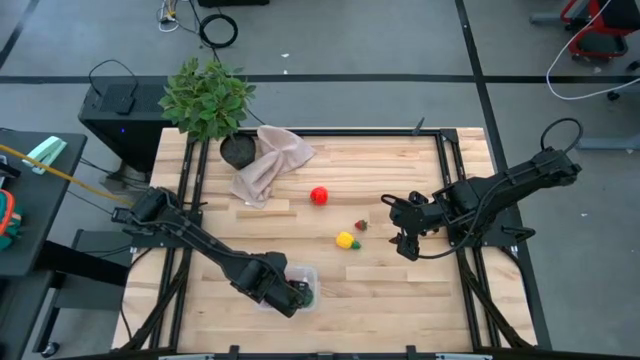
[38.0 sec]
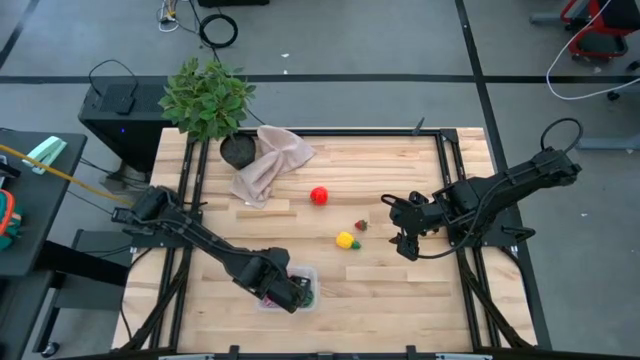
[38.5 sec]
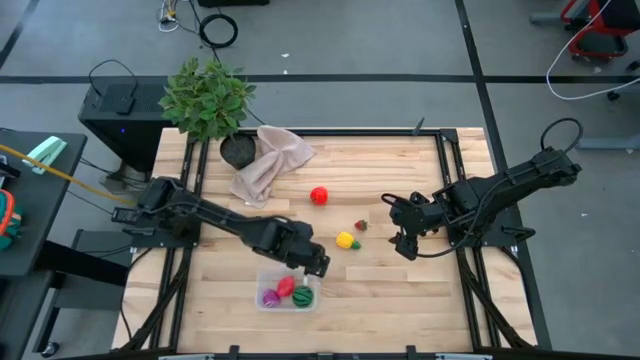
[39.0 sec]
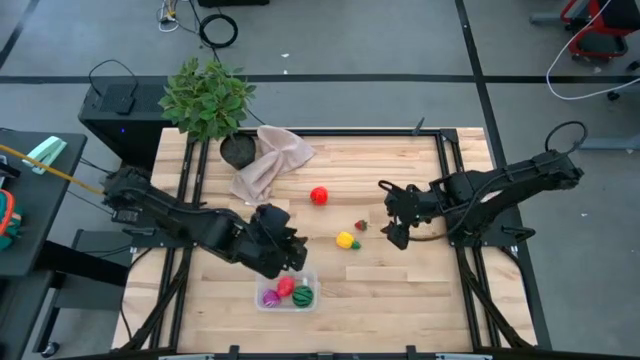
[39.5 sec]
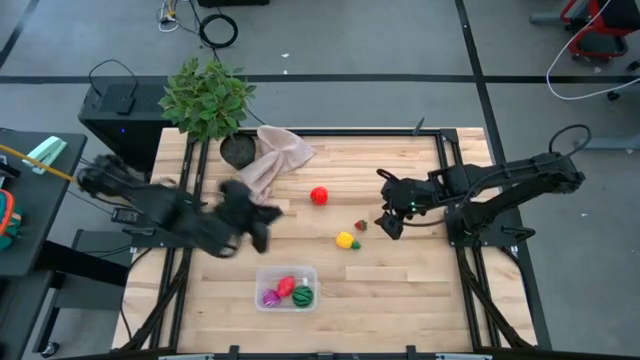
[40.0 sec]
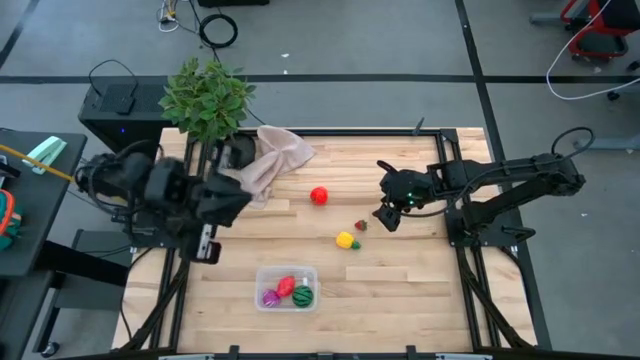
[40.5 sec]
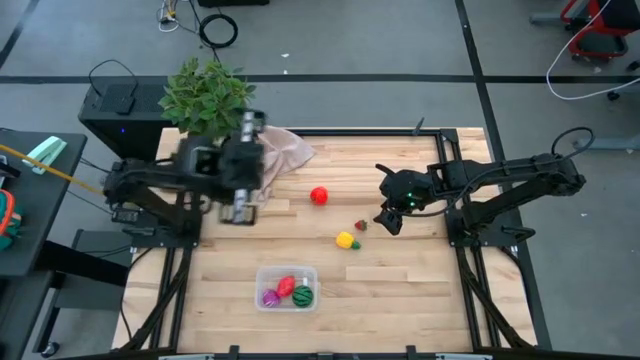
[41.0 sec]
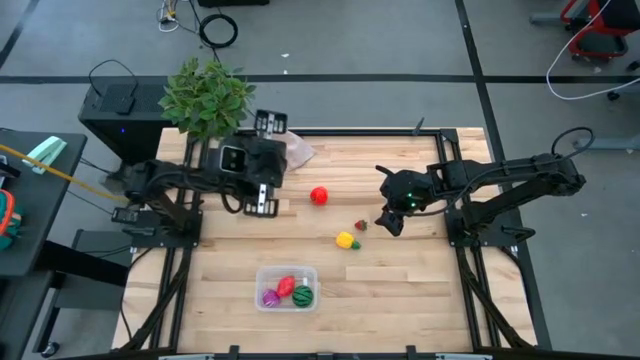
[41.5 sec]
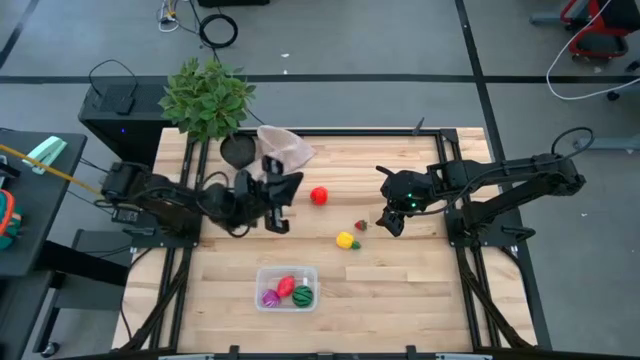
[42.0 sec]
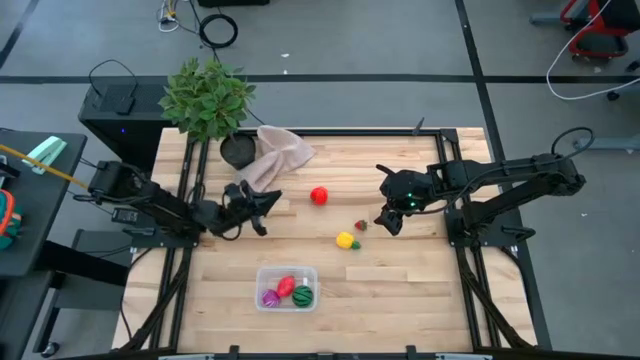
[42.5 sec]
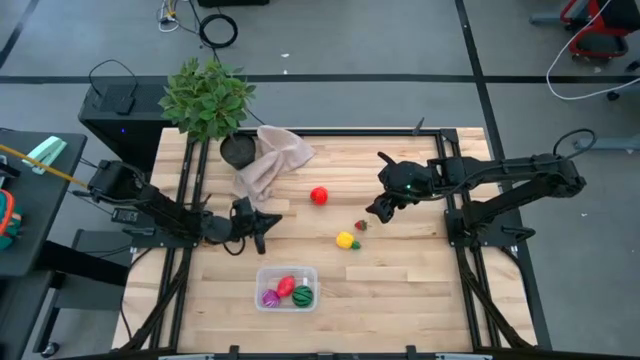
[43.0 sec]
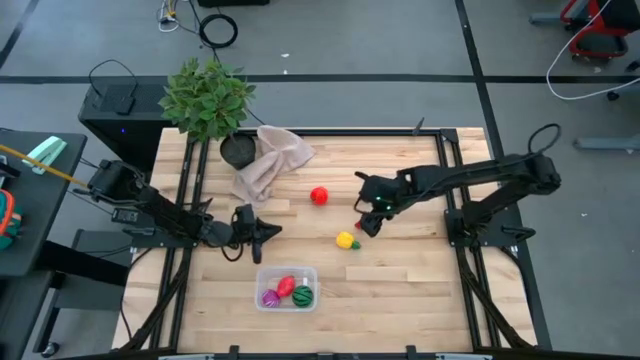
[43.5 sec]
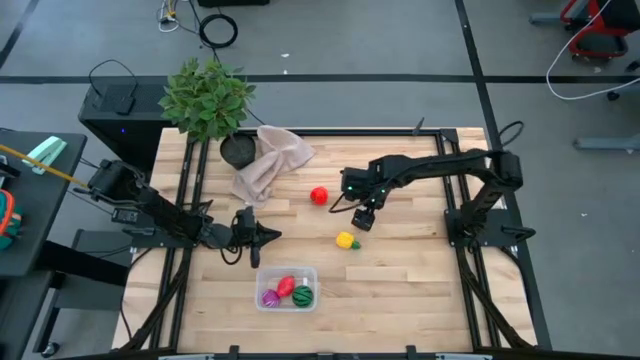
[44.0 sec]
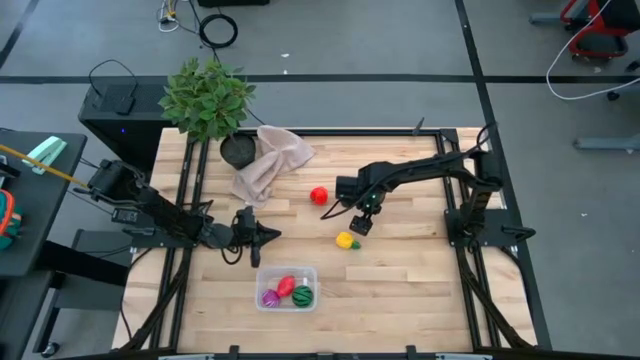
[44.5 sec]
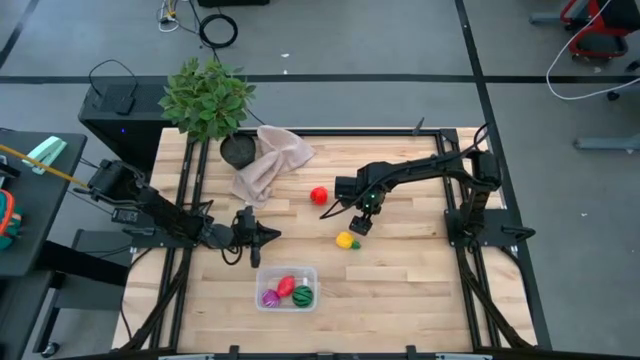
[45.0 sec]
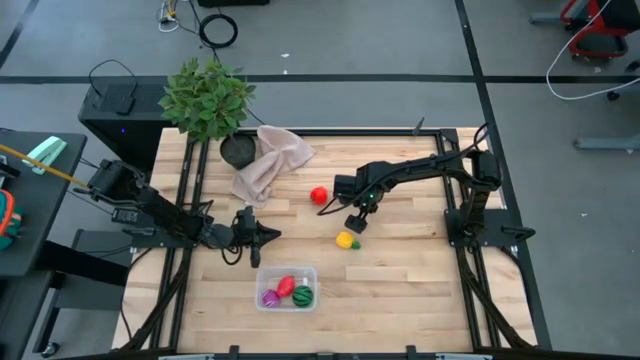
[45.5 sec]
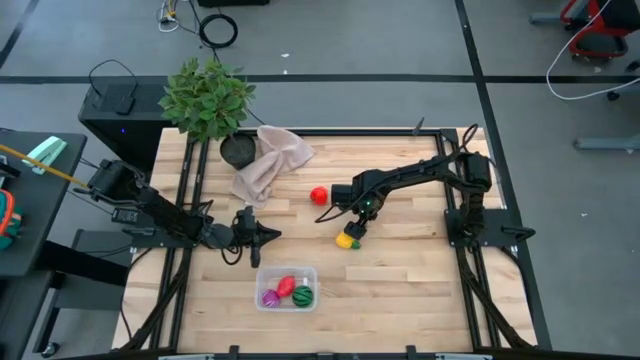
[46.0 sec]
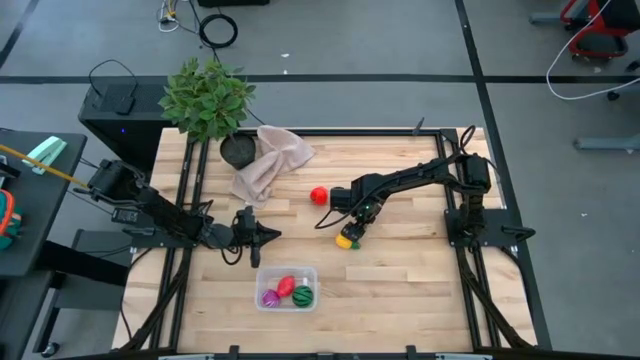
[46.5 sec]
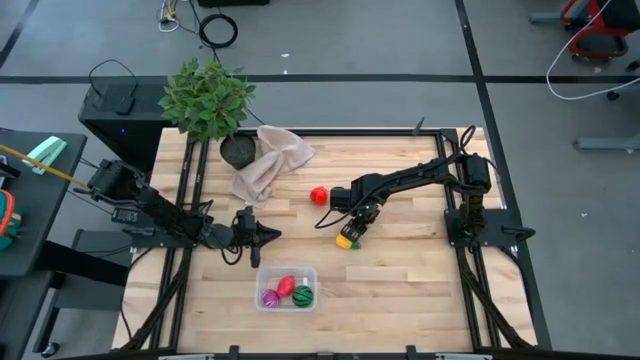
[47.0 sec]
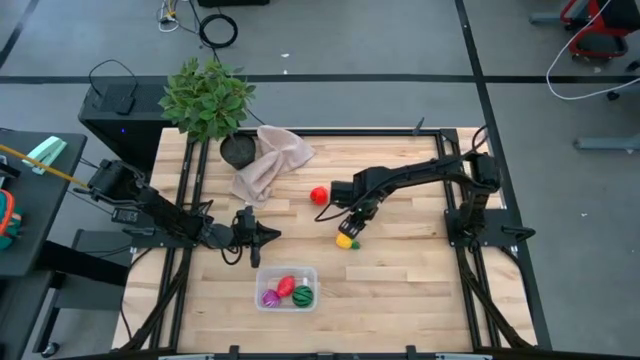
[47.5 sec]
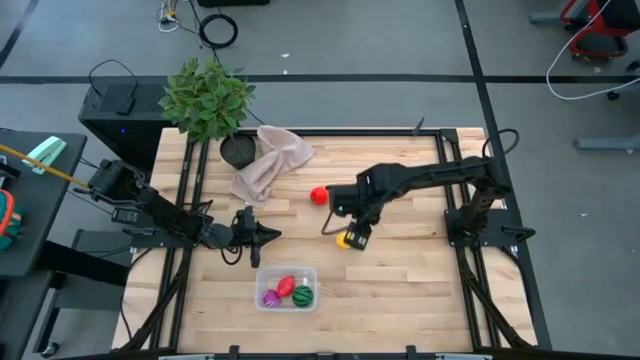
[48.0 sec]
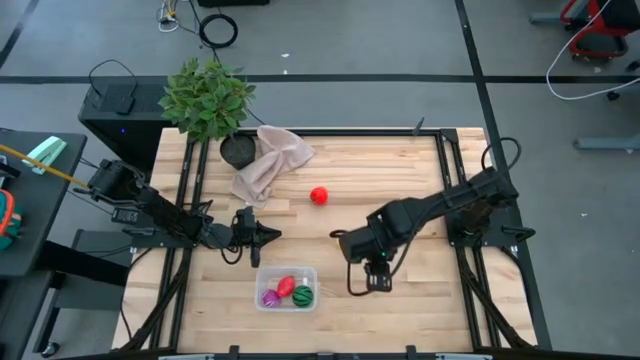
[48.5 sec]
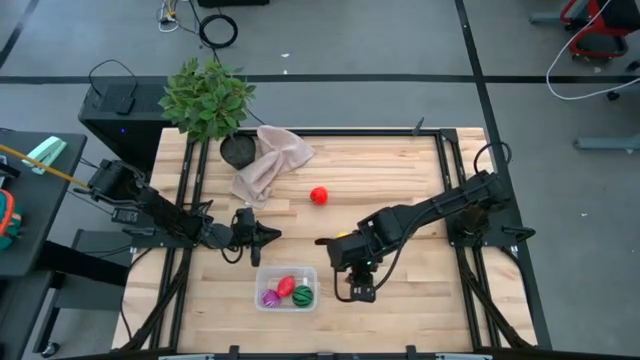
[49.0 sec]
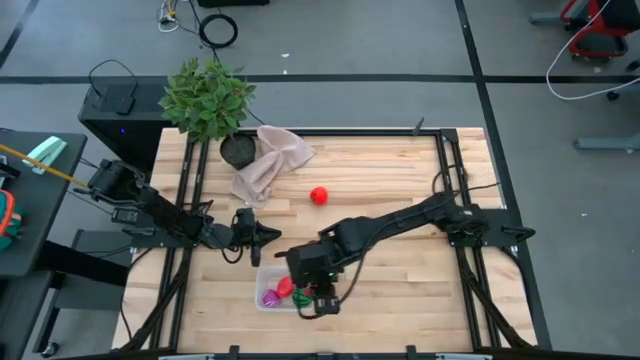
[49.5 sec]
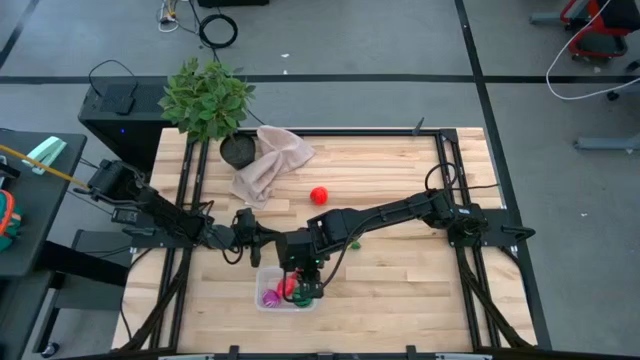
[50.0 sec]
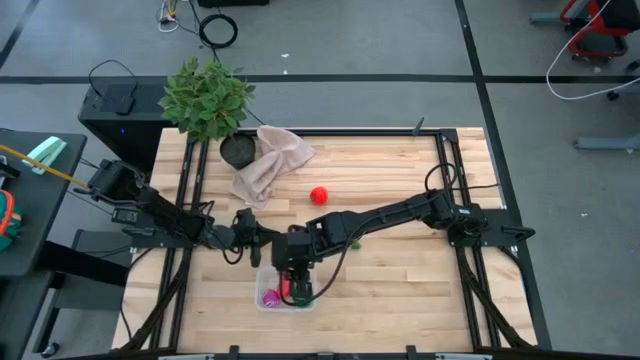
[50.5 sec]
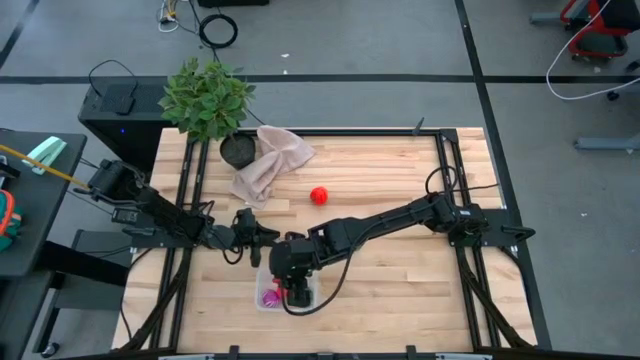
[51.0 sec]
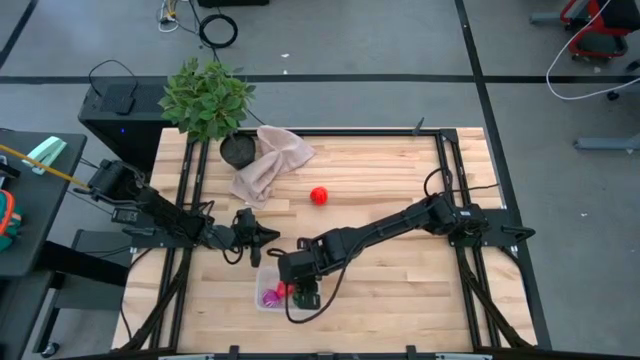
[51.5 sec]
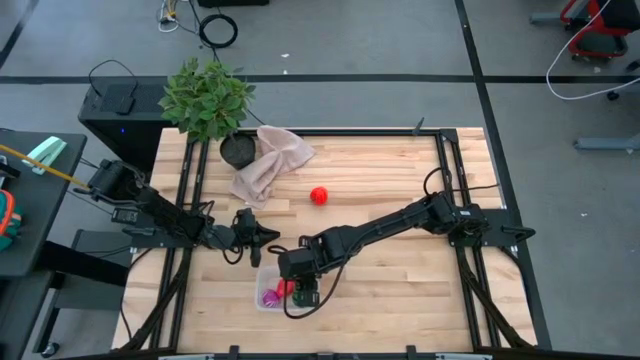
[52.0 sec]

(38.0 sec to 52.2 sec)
Task: Pick and placing Produce into tupperware
Put the strawberry into the transparent bin

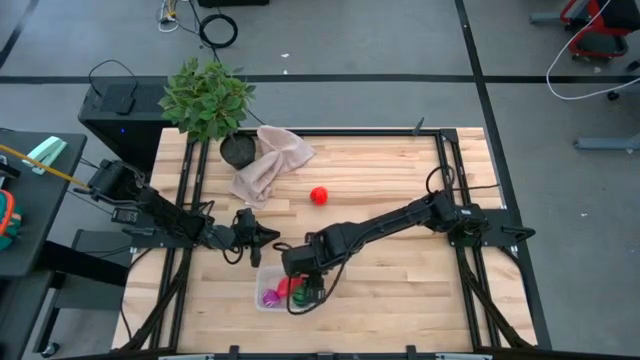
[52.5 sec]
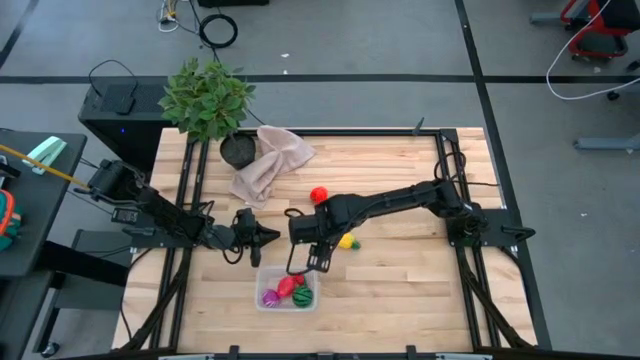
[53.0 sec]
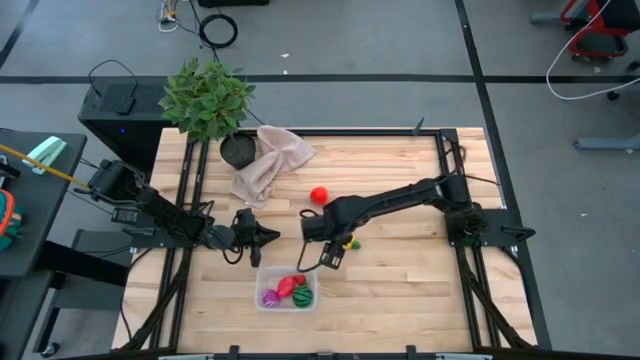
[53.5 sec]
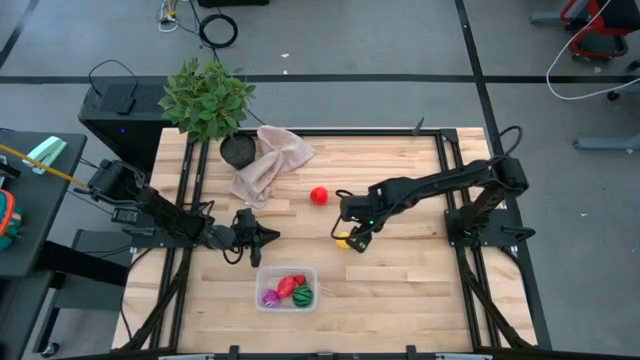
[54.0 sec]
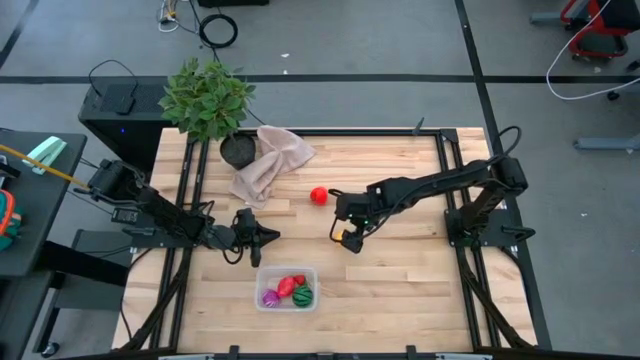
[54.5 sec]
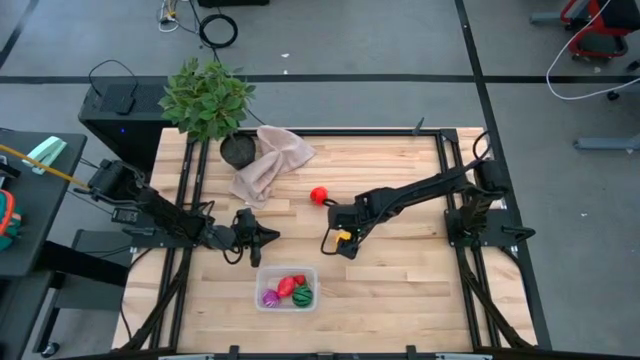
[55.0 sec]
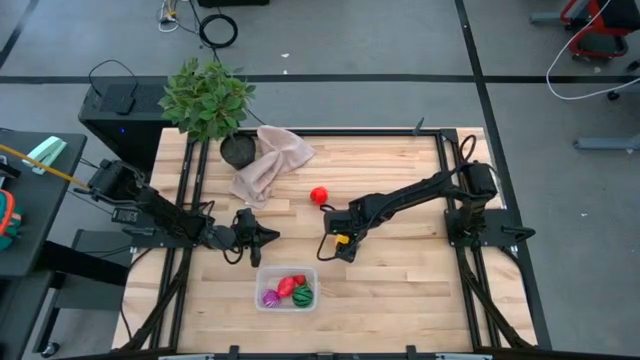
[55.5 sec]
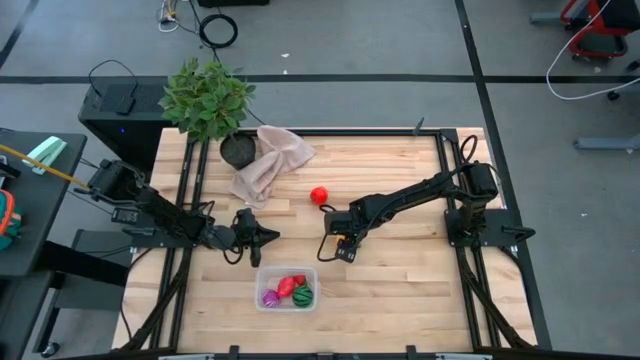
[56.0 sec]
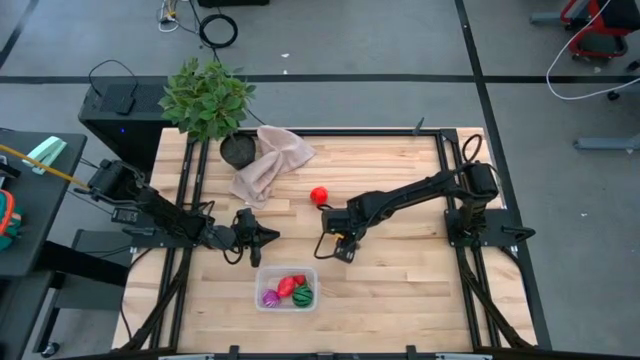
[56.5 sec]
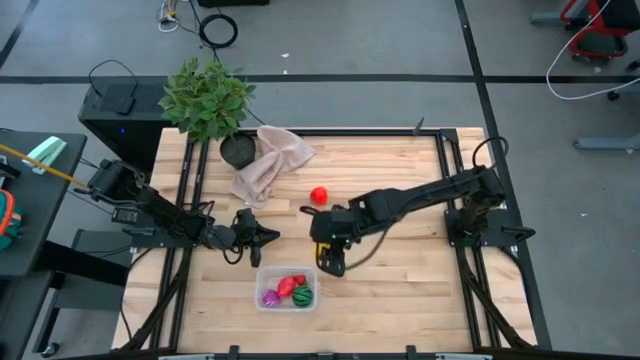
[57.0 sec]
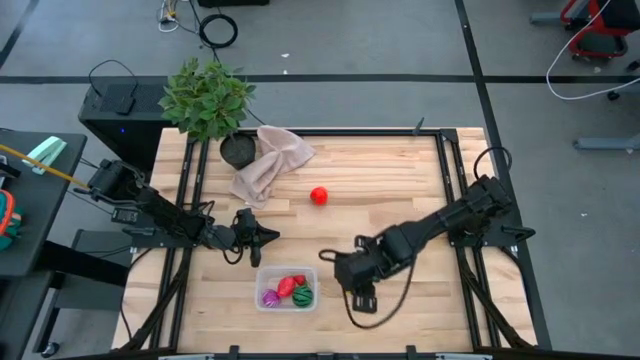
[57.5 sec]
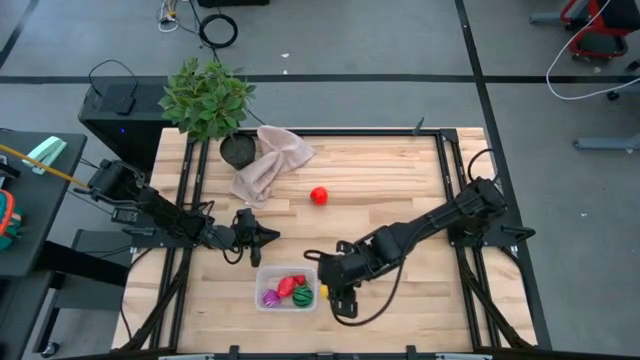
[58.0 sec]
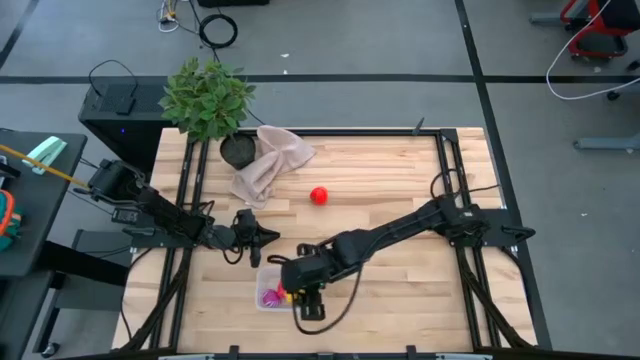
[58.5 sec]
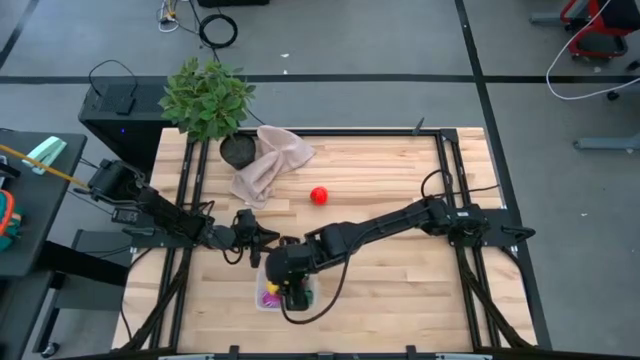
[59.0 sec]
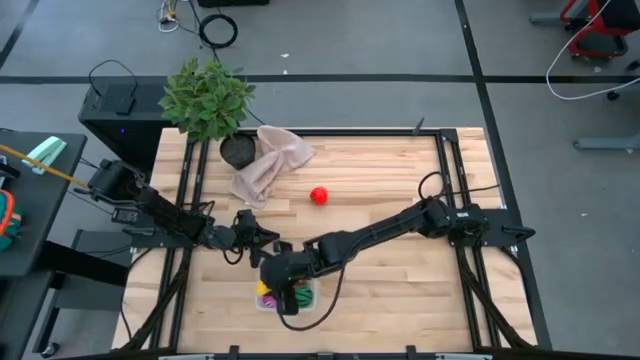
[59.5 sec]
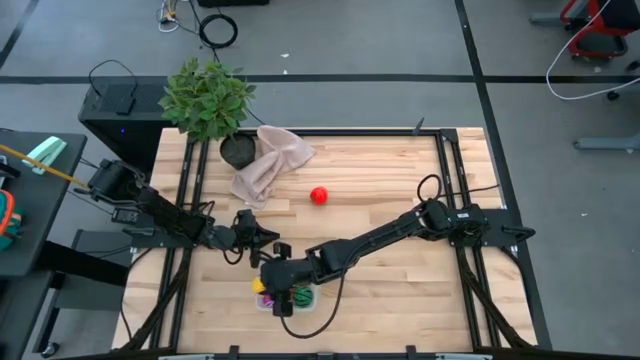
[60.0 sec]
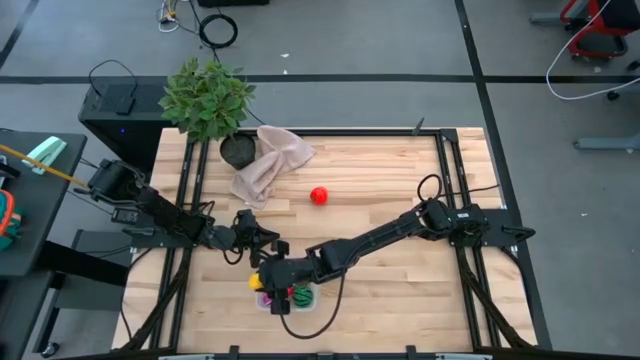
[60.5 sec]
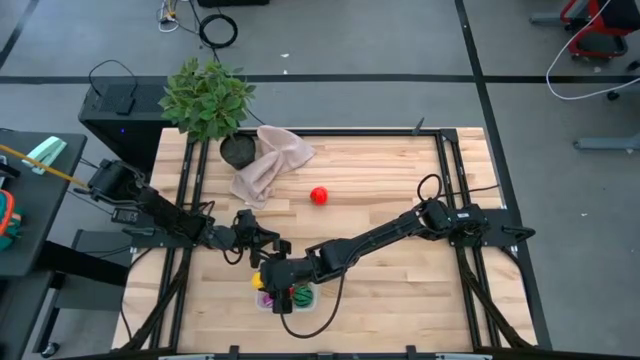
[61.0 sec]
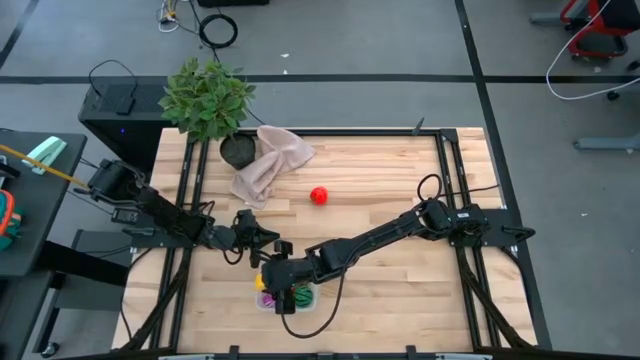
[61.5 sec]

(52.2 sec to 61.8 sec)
Put the pineapple into the transparent bin
